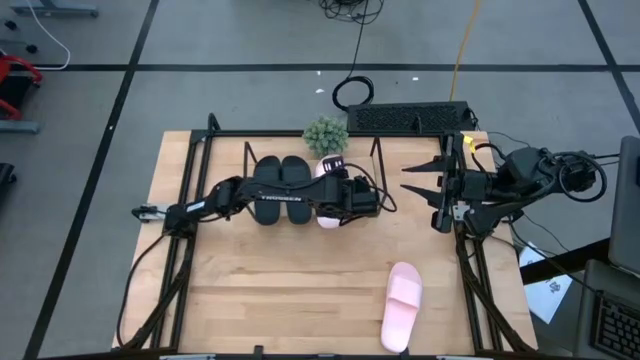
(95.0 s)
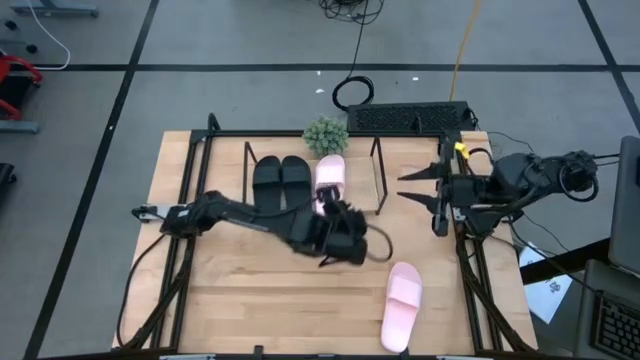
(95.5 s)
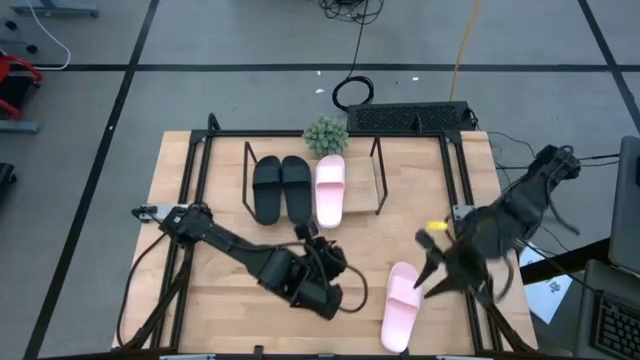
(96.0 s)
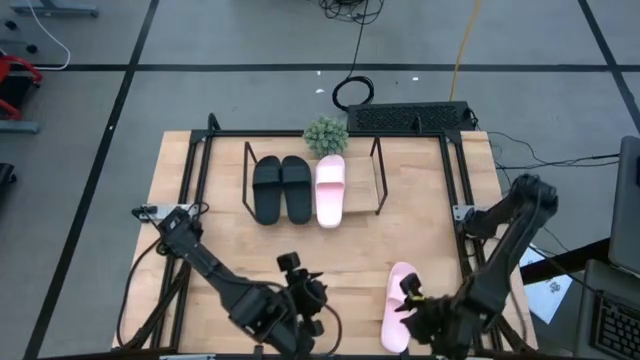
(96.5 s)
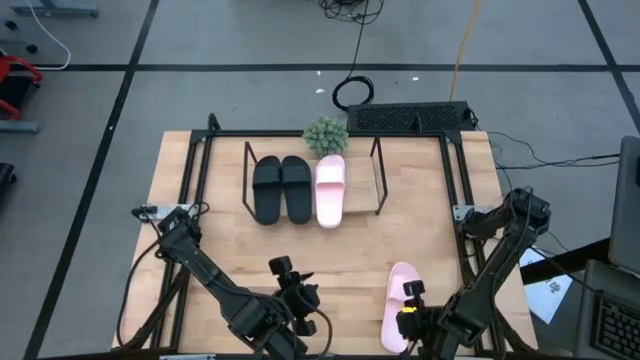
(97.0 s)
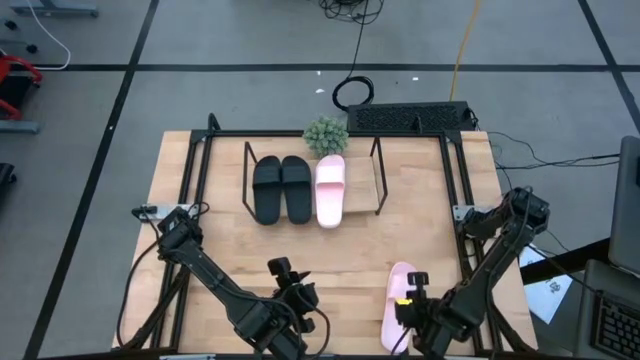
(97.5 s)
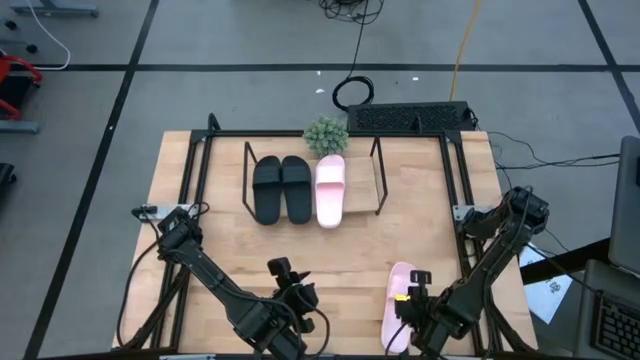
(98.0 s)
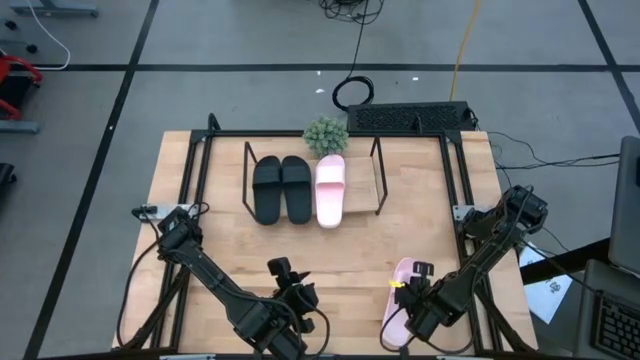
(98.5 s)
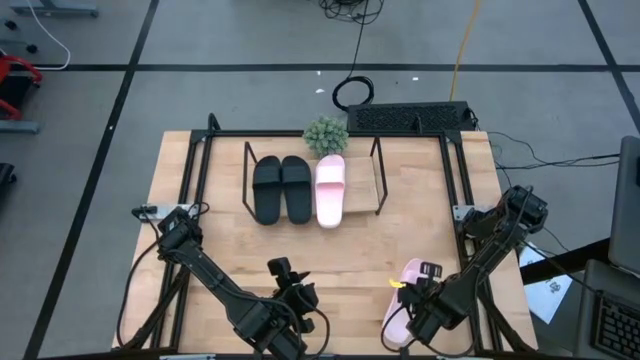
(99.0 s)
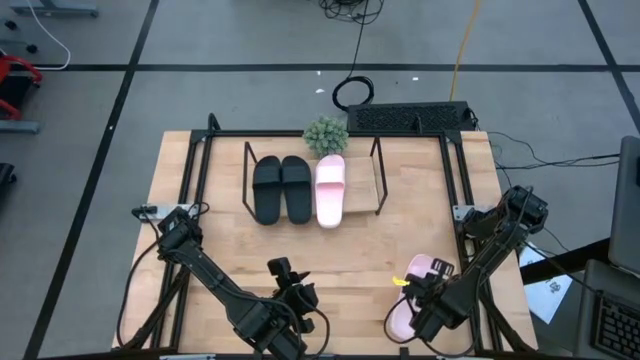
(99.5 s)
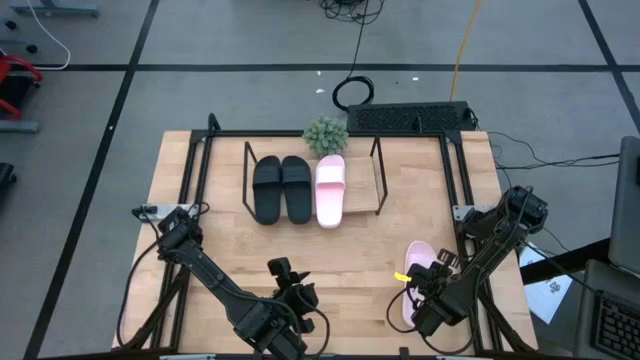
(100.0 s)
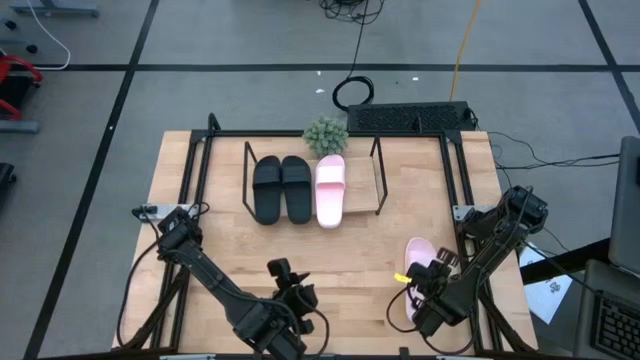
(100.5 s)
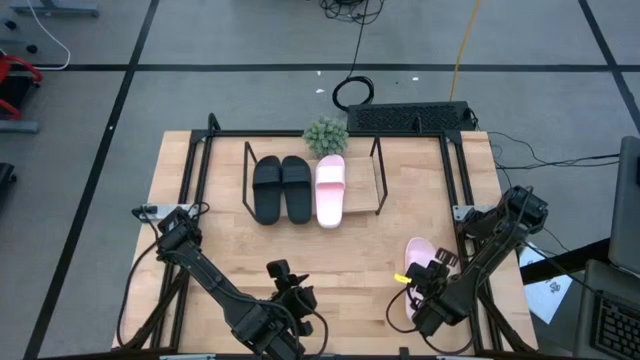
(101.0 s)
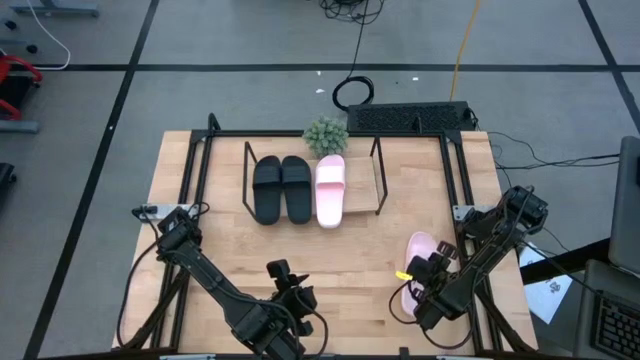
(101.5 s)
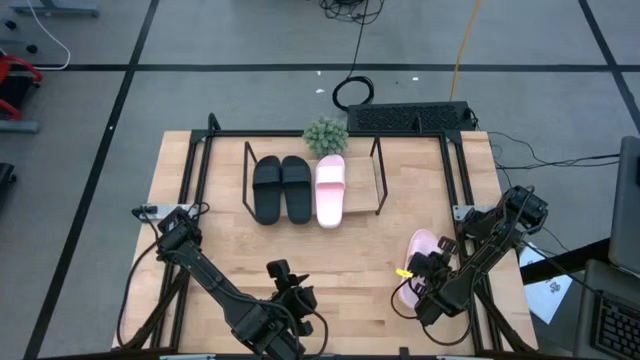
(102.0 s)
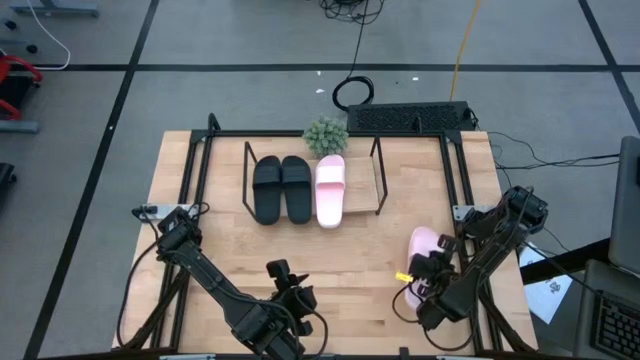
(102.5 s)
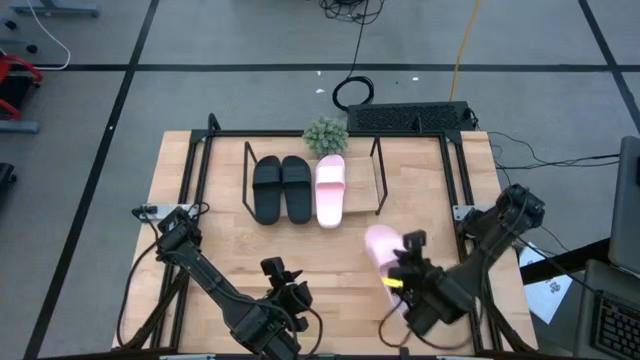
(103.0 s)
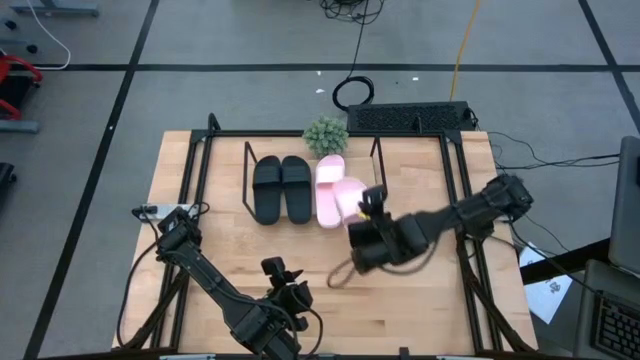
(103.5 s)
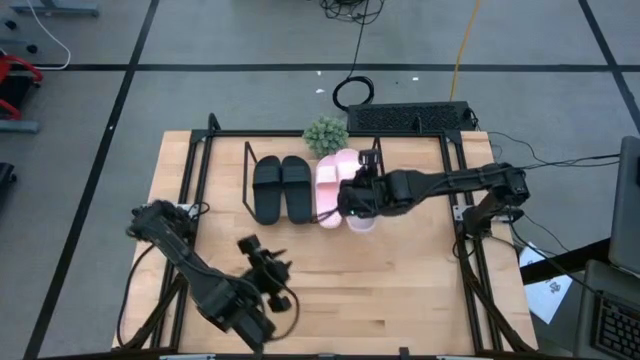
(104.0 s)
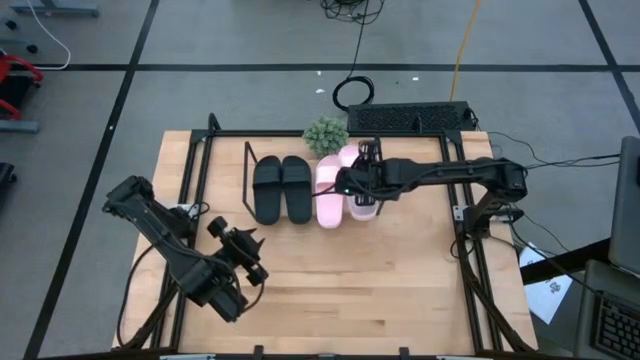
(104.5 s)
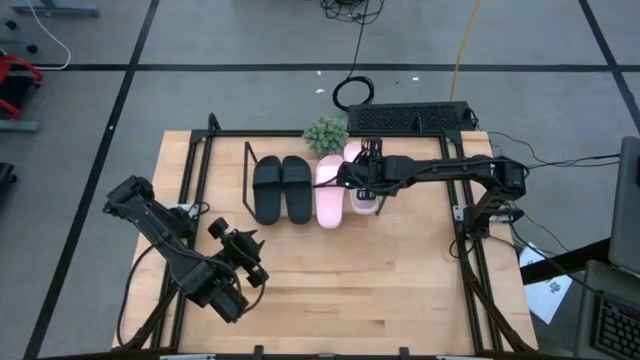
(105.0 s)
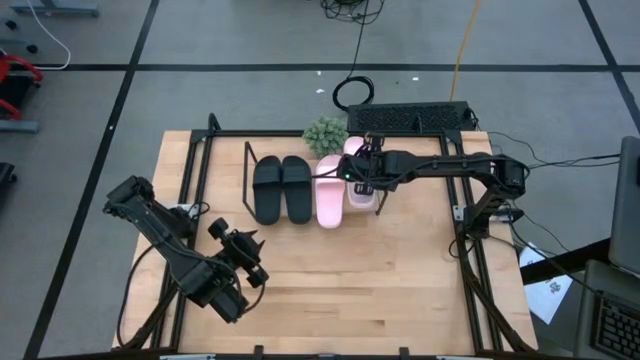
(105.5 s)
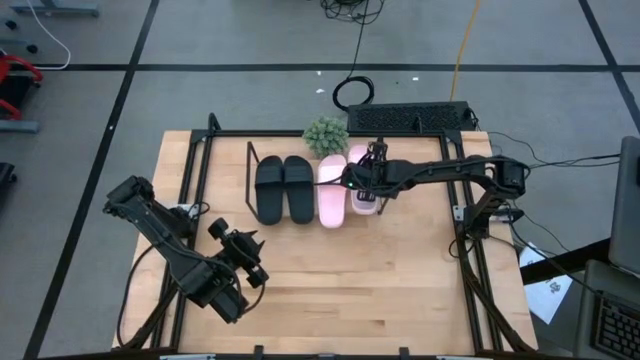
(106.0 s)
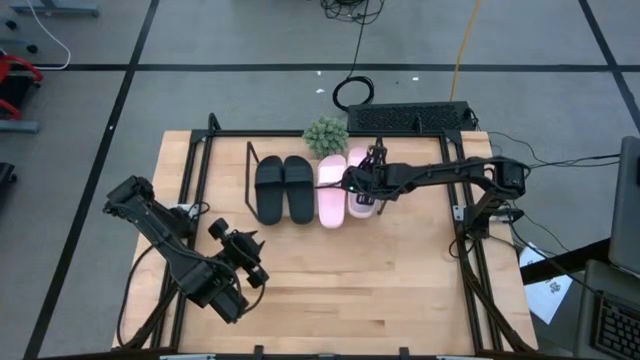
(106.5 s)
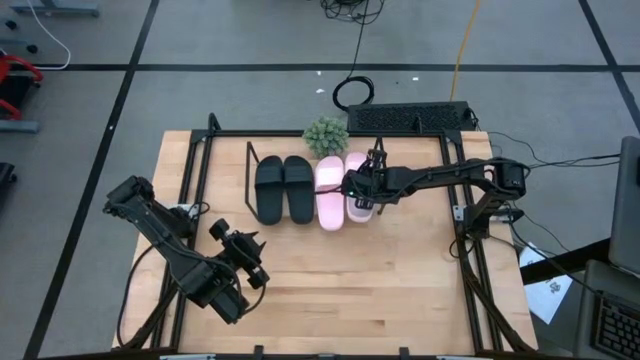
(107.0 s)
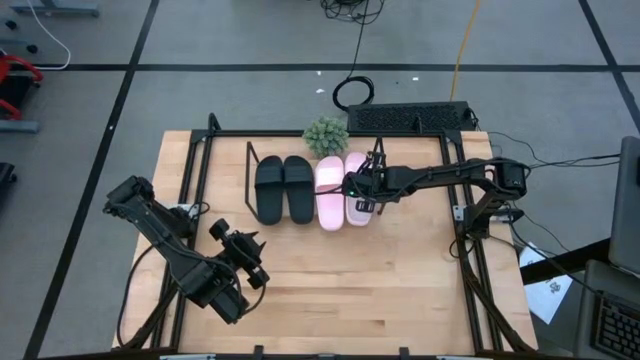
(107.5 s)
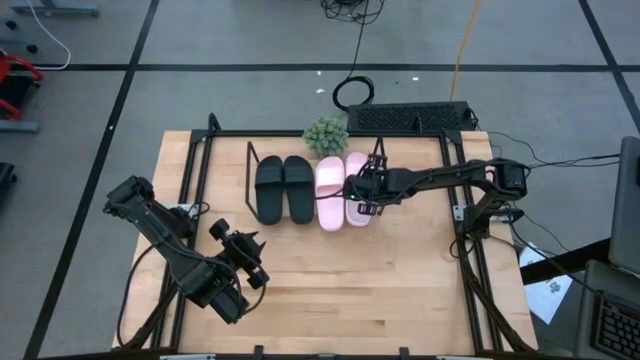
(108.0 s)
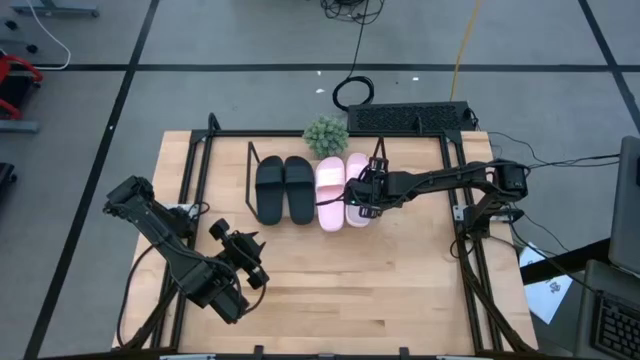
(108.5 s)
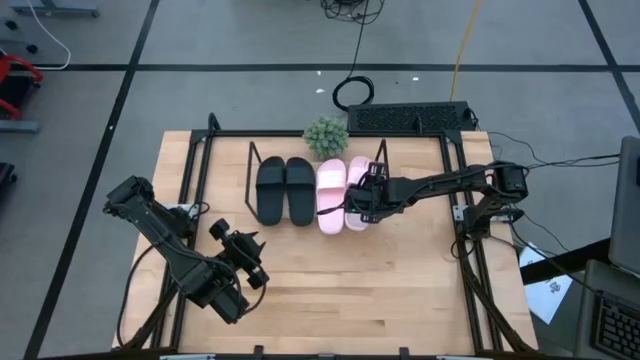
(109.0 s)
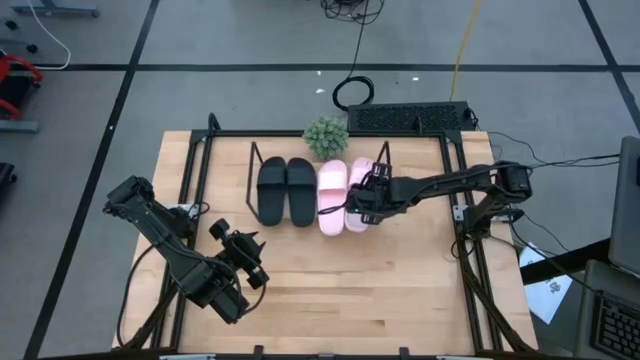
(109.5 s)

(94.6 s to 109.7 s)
Task: Pick and place slides into the shelf
Put the pink slides on the shelf
